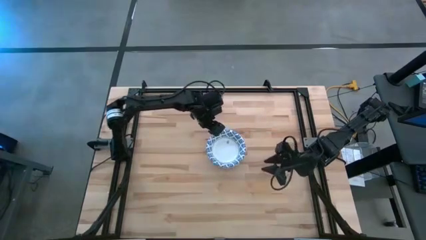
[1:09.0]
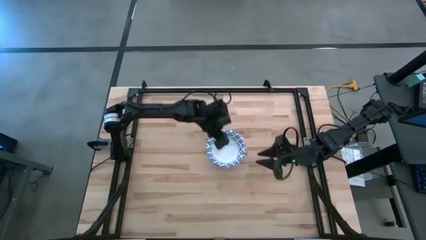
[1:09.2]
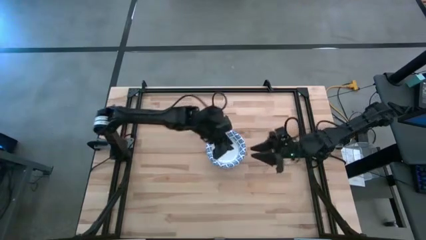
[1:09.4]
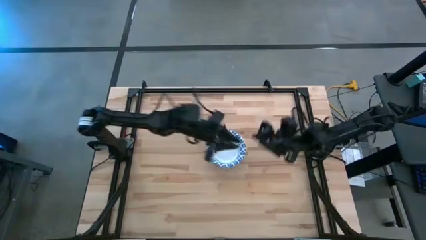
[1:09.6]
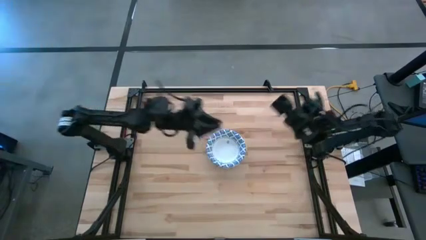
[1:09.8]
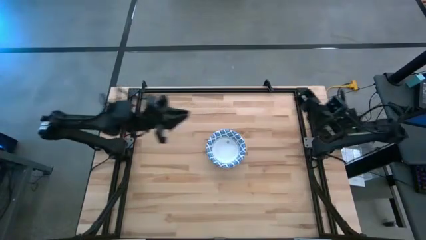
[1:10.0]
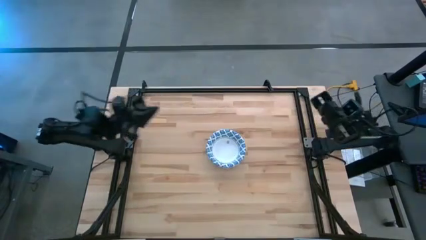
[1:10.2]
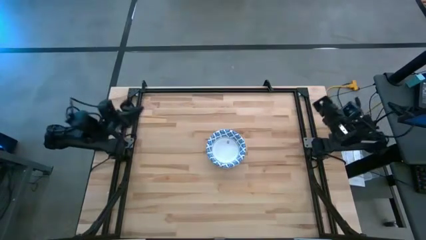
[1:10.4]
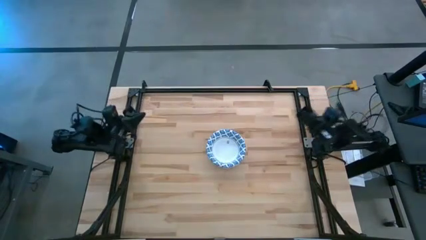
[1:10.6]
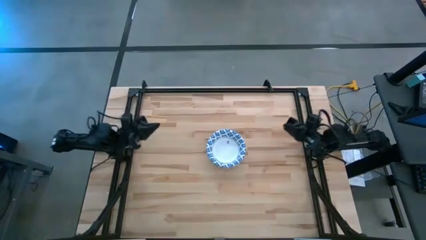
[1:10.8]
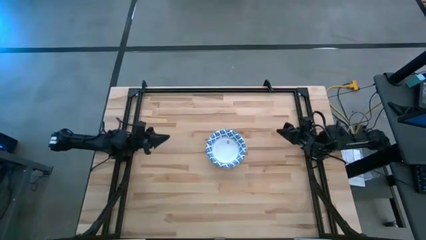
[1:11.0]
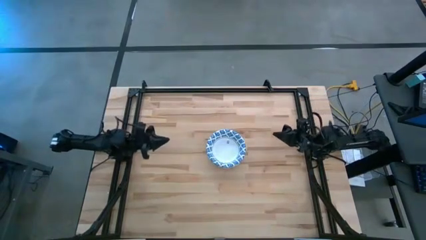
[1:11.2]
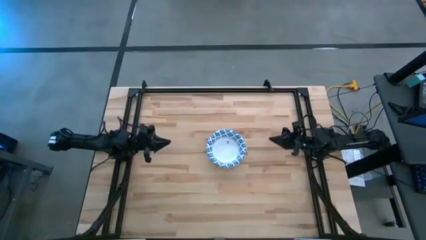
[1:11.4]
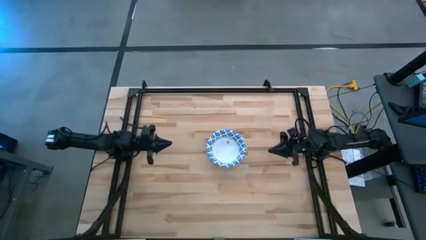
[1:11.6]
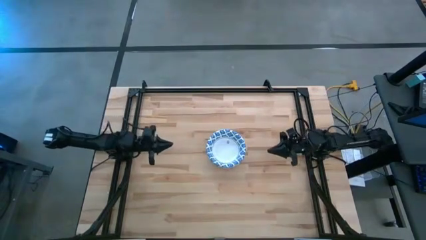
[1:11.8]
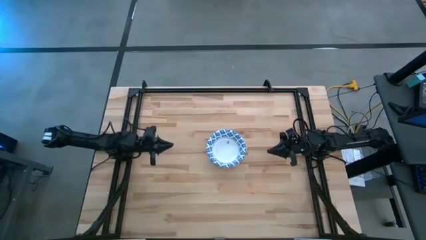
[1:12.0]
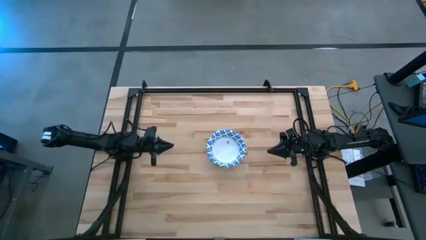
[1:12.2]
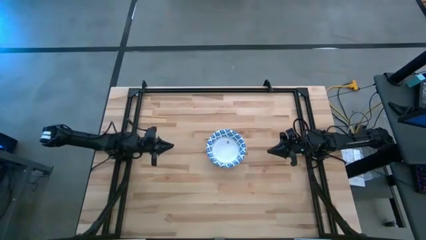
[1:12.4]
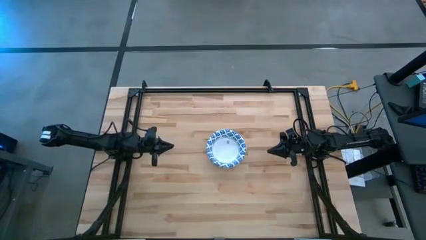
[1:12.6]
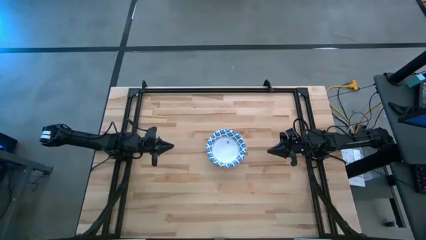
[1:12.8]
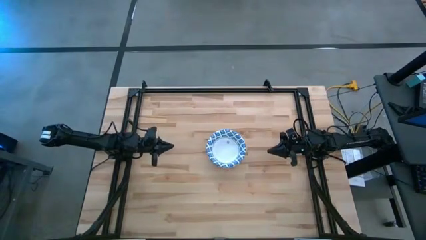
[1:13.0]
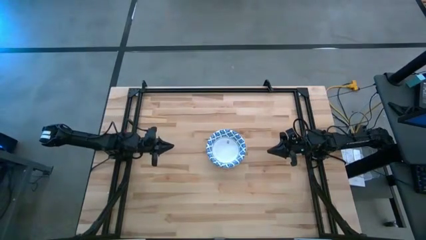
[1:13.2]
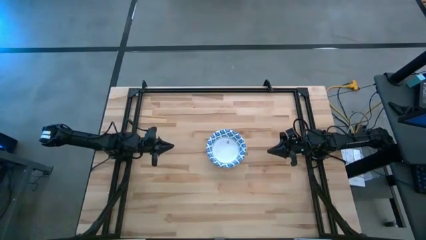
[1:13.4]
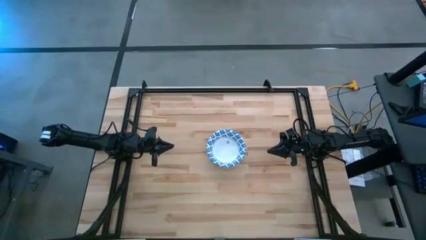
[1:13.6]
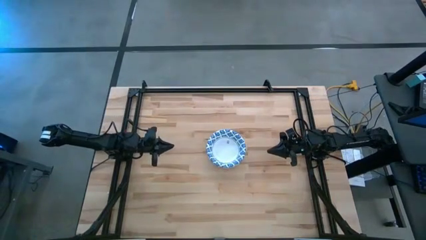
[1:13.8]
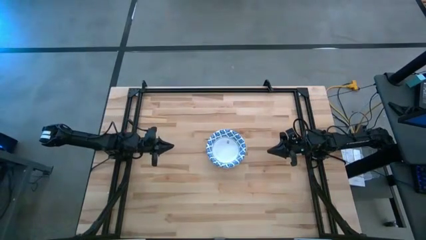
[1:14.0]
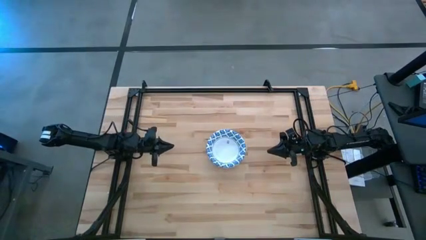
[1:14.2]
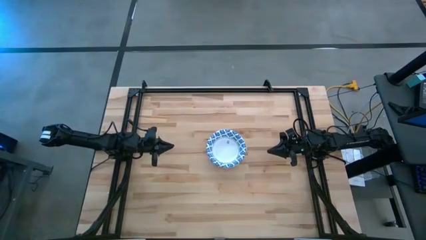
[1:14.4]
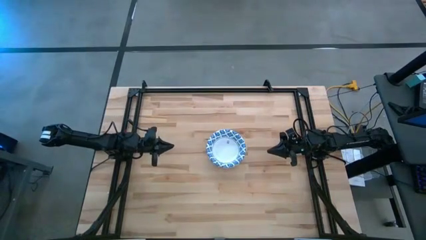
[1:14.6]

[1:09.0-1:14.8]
Task: Nest bowls inside each other
Return to Home Position

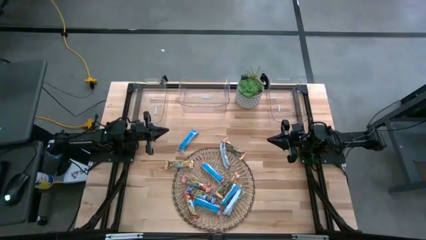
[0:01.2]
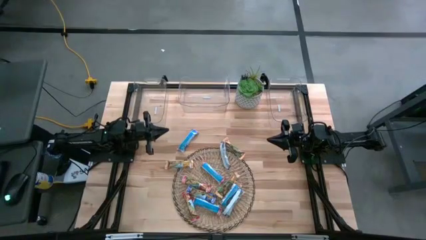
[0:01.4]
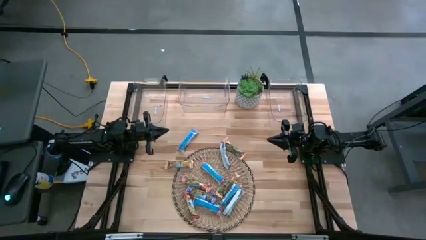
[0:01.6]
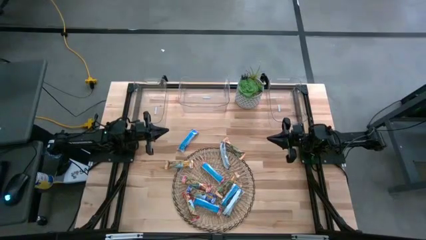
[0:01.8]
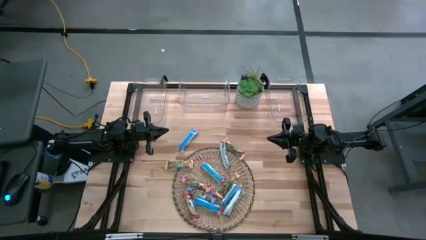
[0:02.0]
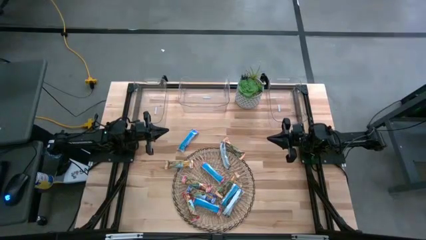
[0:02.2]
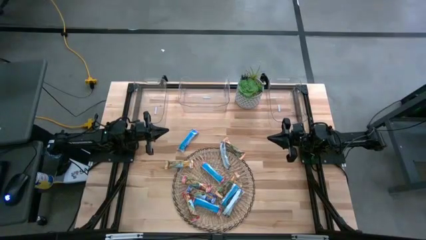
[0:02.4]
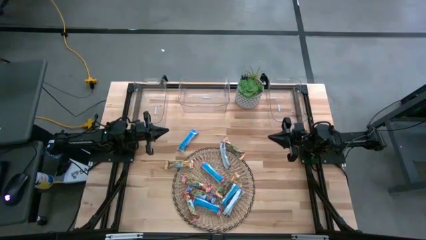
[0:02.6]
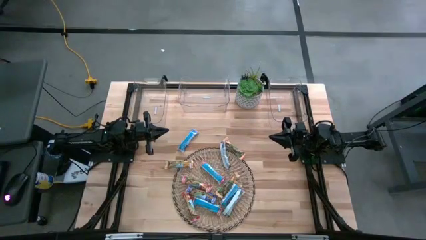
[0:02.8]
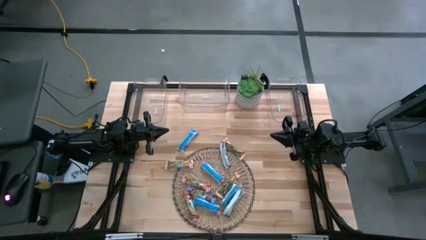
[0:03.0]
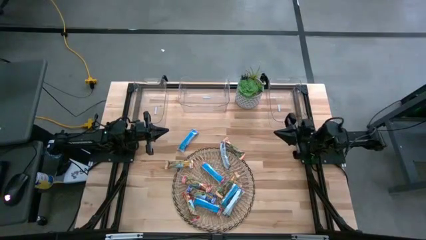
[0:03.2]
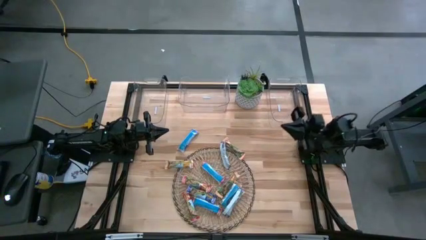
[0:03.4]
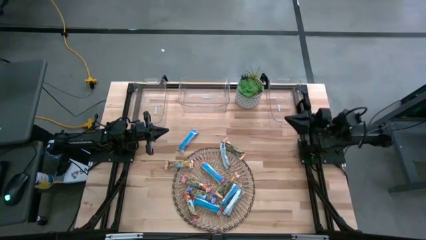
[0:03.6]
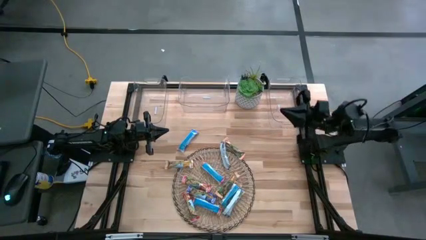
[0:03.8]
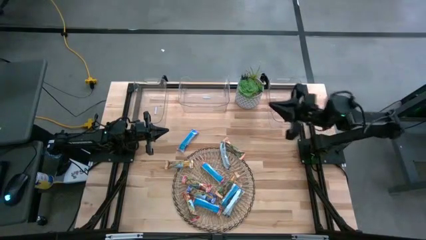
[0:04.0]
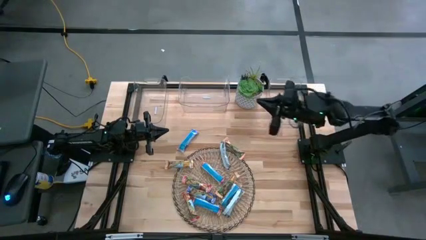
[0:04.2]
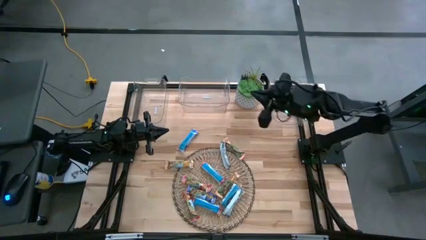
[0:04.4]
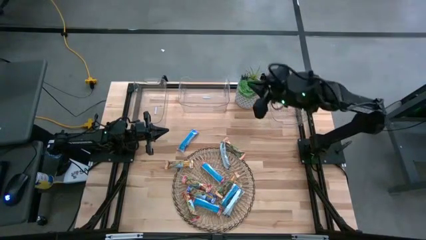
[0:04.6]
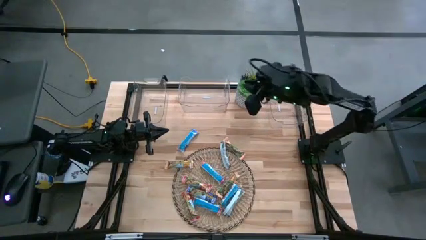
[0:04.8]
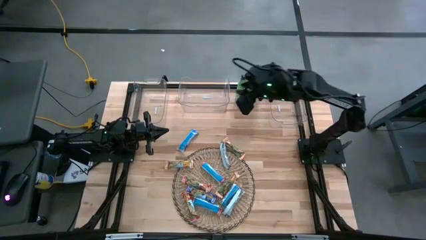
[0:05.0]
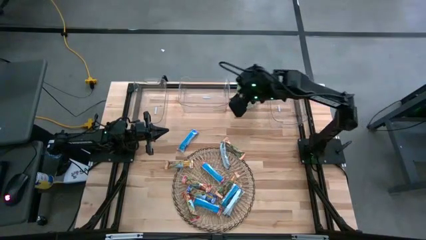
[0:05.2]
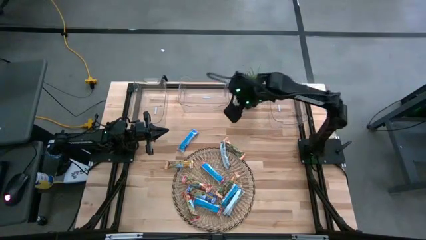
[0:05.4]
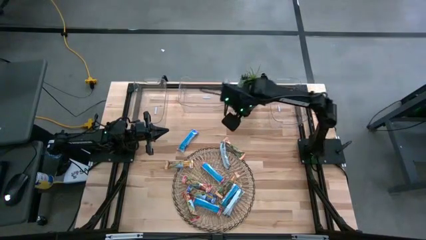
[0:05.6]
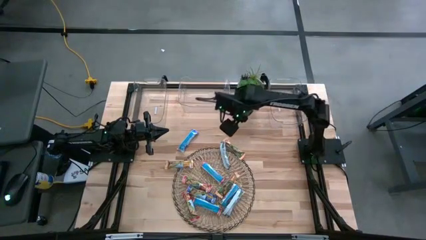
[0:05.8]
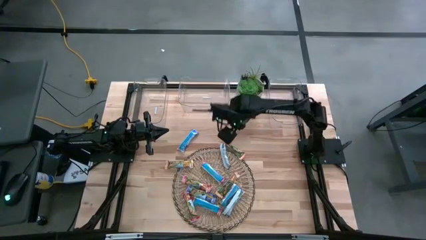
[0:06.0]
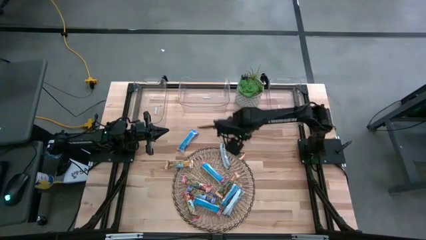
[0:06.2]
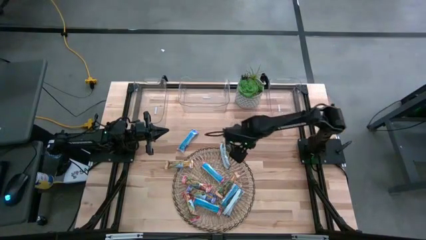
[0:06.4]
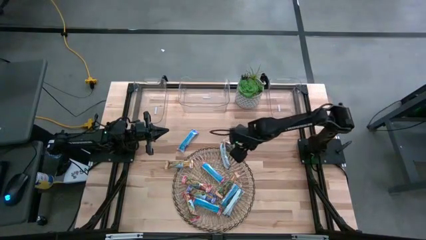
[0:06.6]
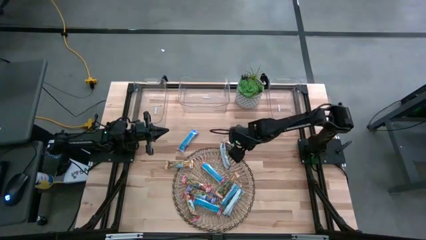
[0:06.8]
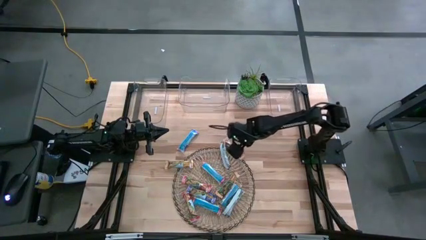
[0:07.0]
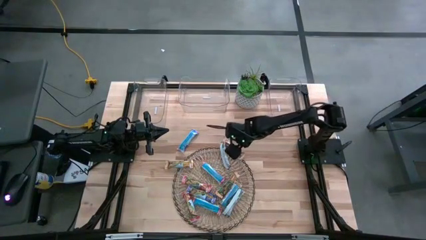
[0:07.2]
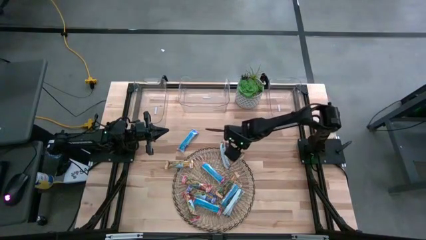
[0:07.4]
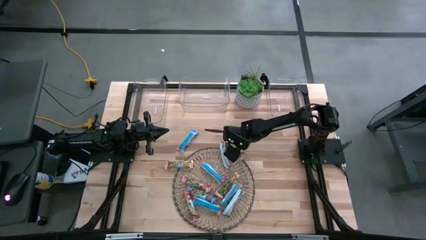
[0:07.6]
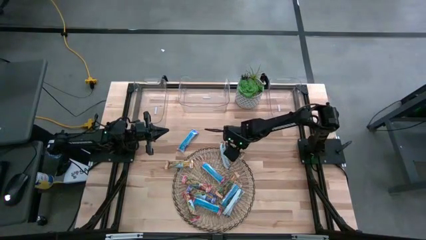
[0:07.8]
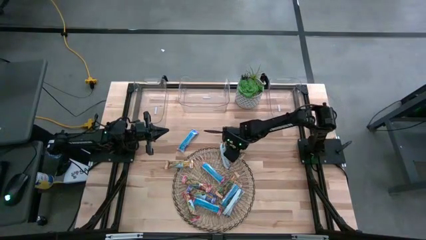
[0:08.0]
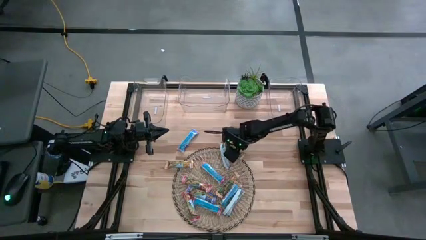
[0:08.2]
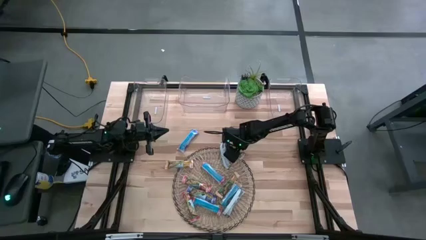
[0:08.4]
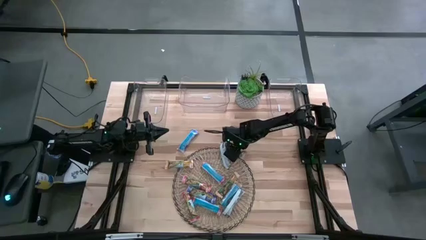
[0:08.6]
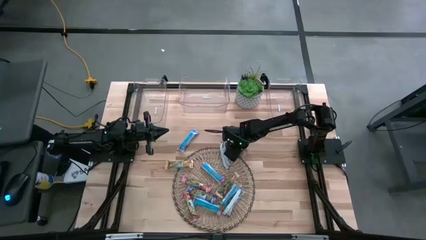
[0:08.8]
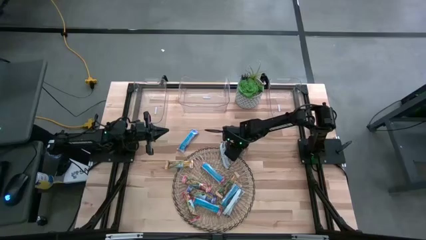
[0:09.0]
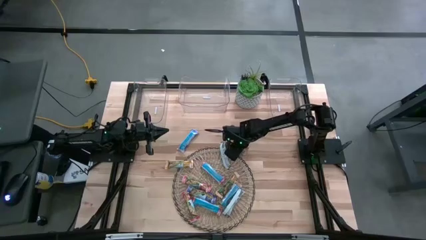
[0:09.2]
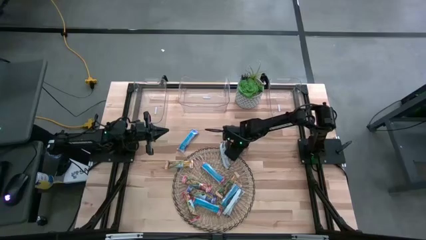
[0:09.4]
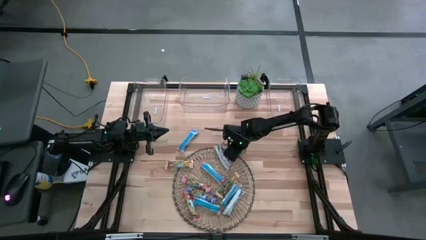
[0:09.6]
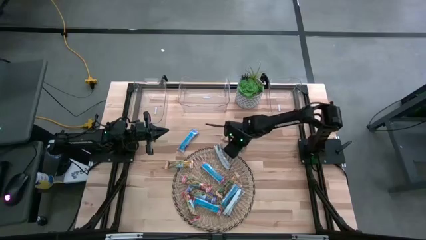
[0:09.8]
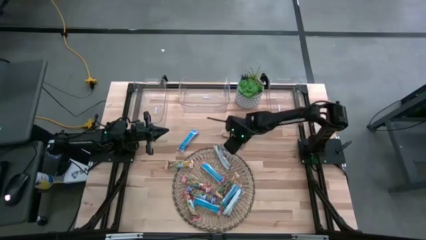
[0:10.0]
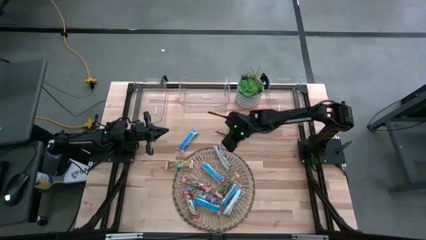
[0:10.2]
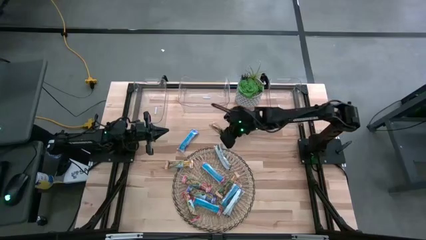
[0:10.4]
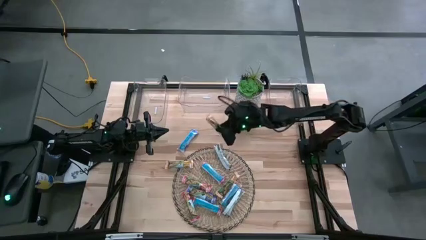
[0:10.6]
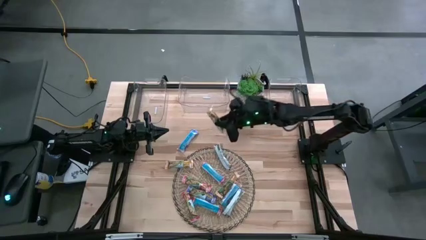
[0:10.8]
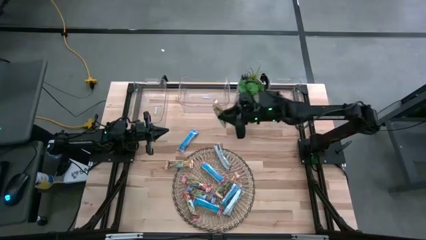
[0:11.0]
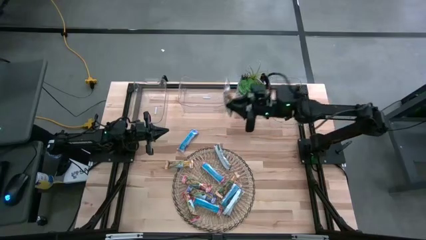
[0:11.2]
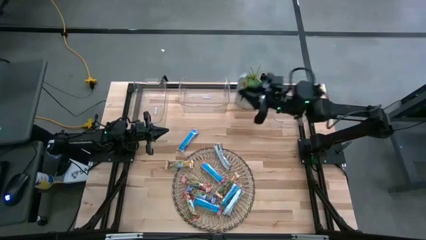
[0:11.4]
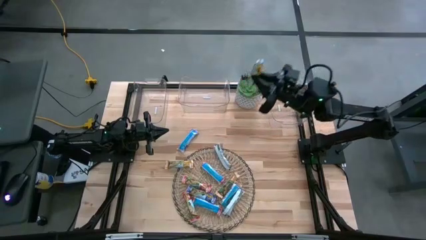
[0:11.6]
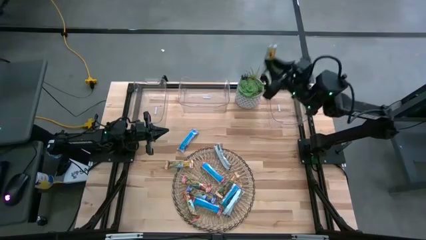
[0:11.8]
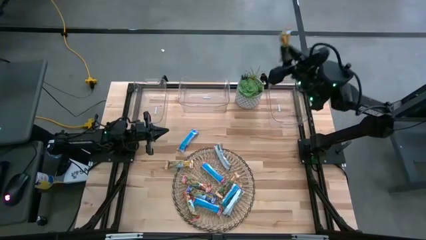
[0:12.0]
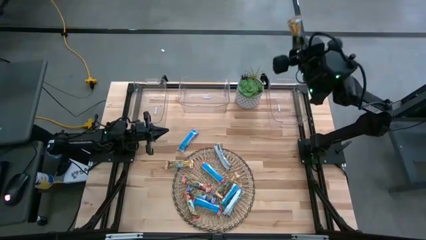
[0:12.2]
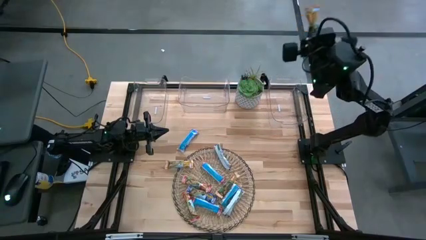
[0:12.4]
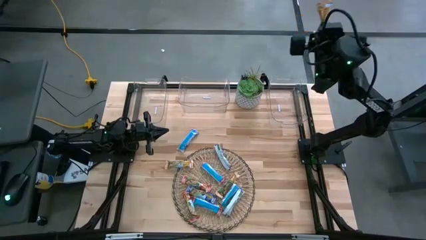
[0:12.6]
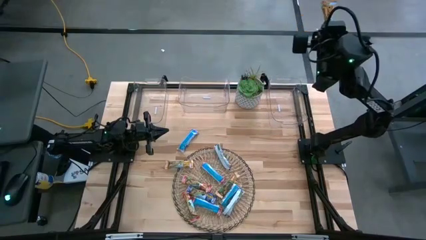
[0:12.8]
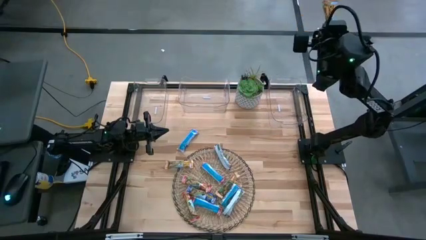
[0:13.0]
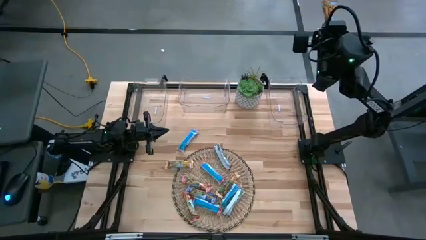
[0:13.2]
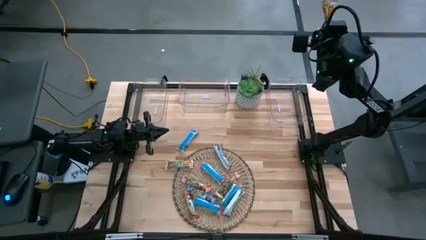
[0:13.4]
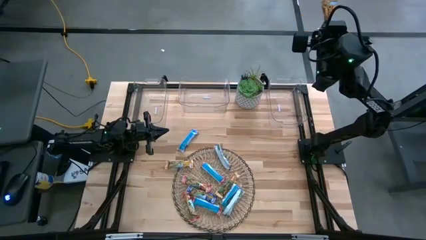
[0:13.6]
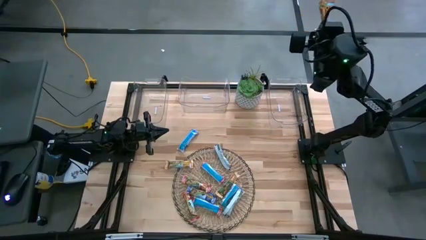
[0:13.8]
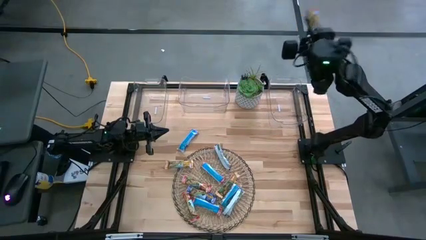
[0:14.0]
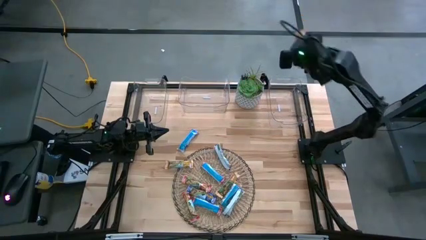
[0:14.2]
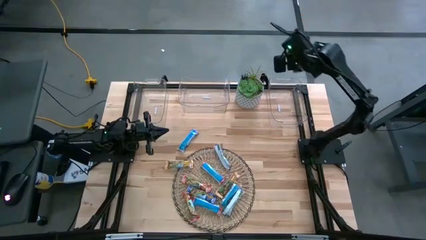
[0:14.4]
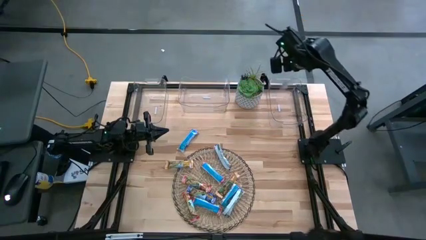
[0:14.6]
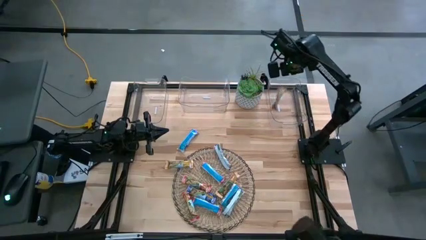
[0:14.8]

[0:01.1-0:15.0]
Task: Pick and place Granola Bars by type
Put the yellow granola bar into the right transparent bin
